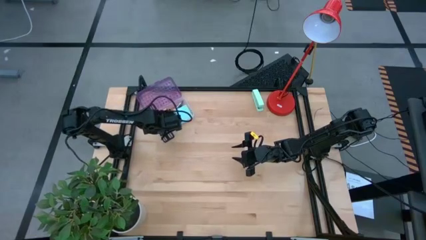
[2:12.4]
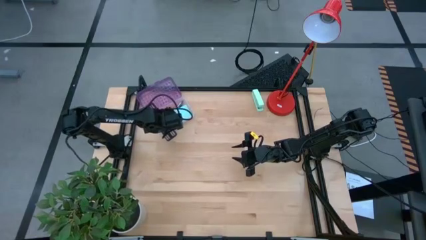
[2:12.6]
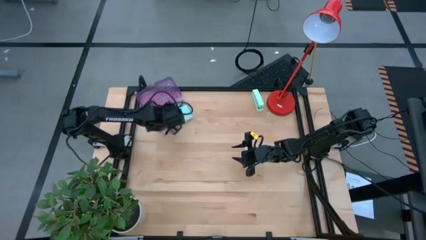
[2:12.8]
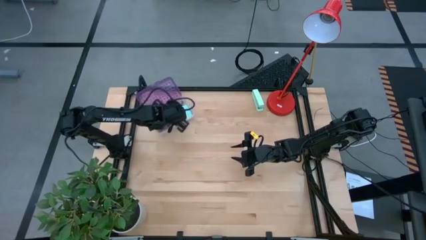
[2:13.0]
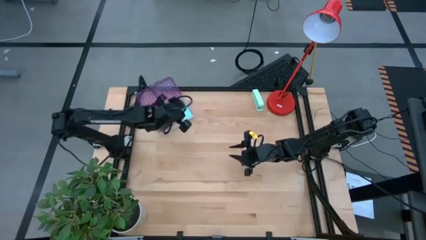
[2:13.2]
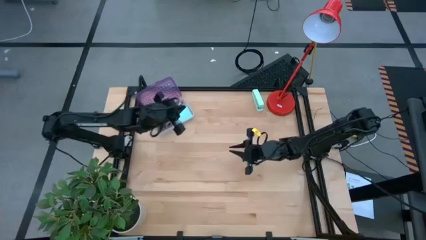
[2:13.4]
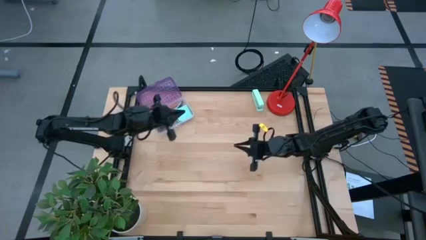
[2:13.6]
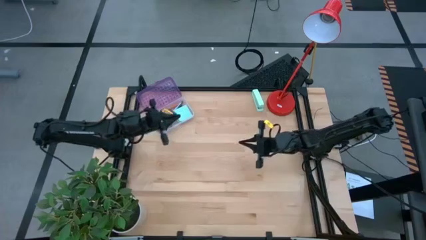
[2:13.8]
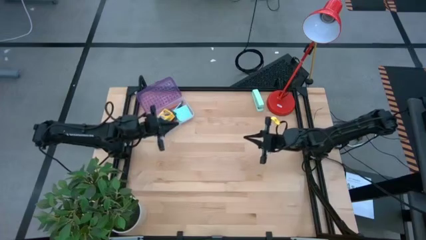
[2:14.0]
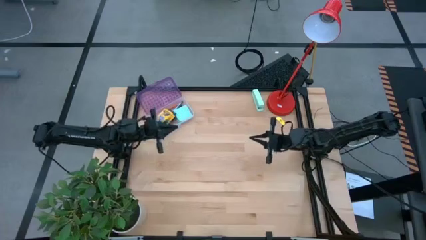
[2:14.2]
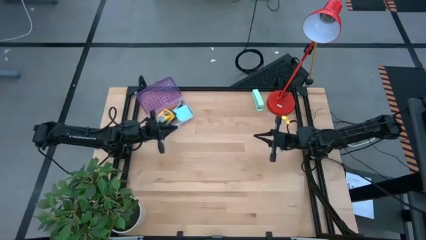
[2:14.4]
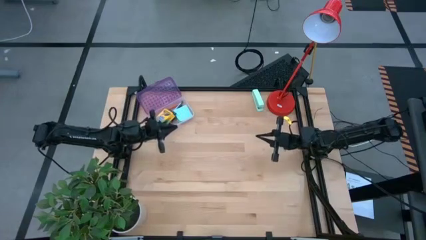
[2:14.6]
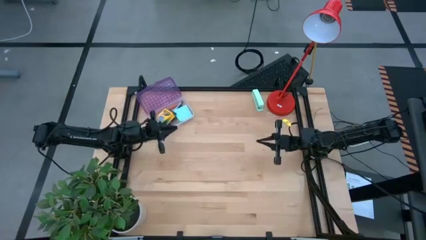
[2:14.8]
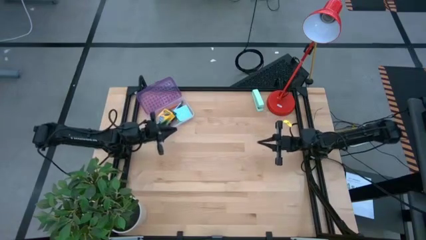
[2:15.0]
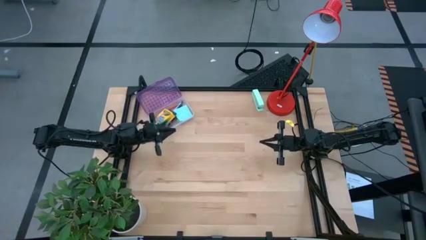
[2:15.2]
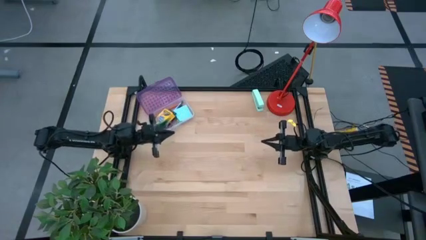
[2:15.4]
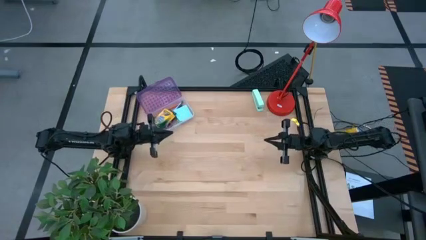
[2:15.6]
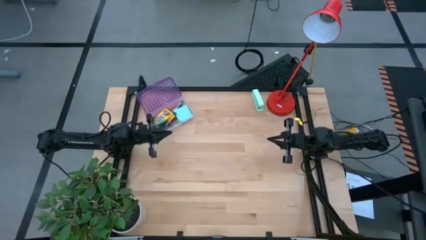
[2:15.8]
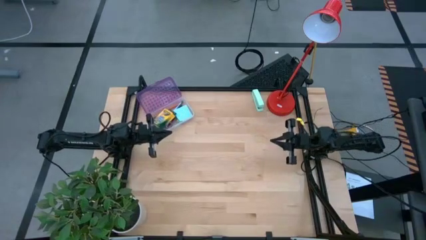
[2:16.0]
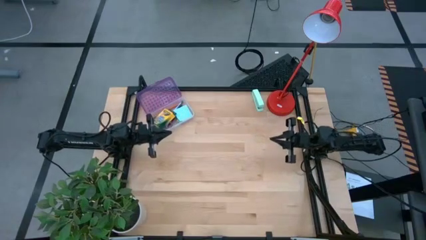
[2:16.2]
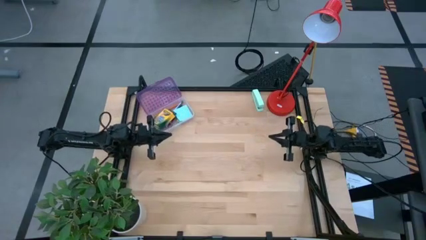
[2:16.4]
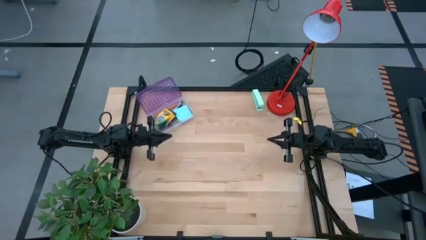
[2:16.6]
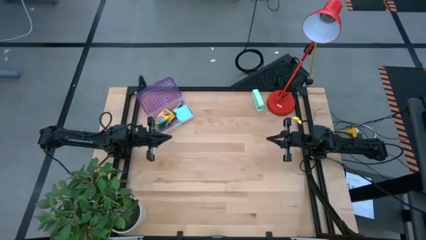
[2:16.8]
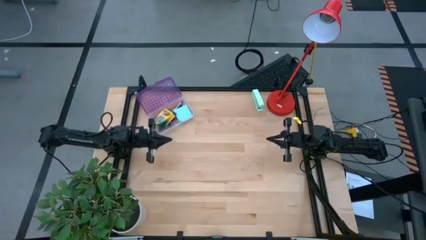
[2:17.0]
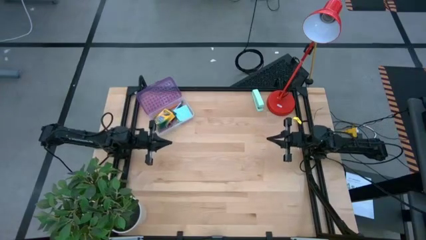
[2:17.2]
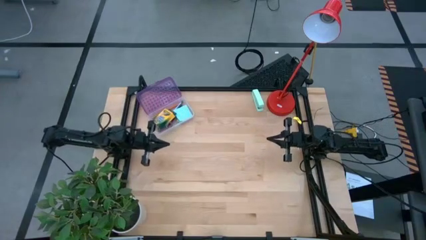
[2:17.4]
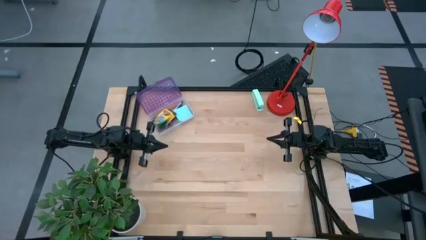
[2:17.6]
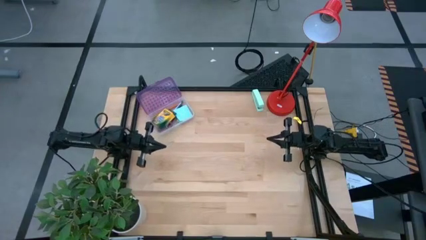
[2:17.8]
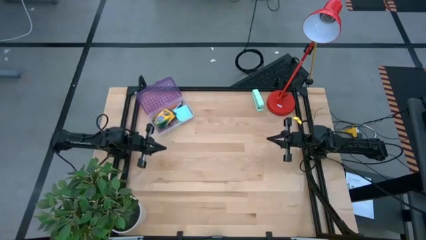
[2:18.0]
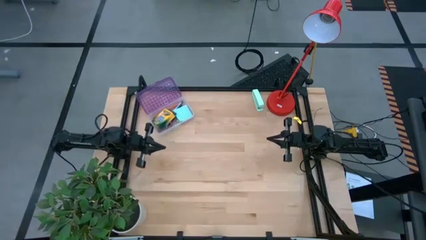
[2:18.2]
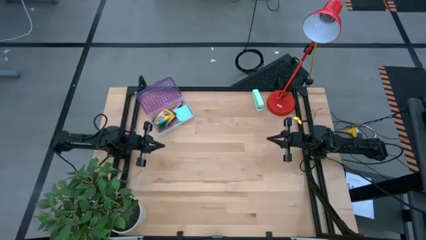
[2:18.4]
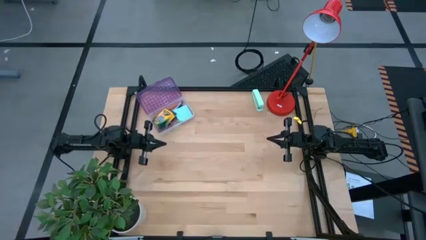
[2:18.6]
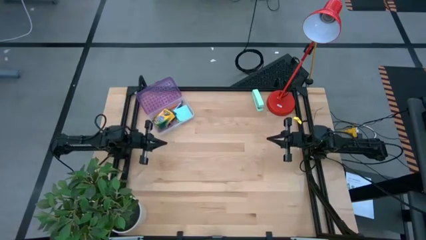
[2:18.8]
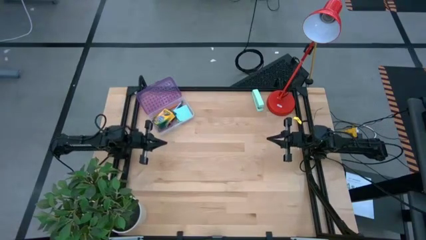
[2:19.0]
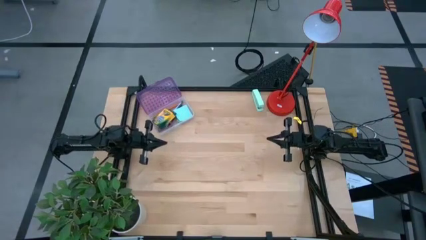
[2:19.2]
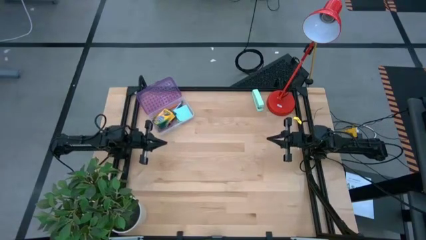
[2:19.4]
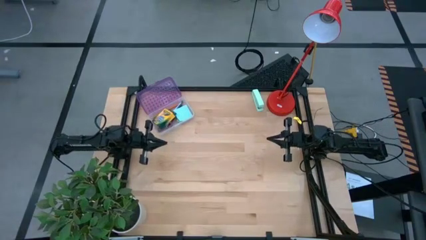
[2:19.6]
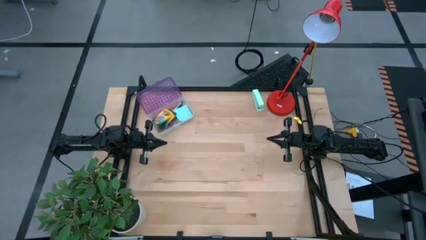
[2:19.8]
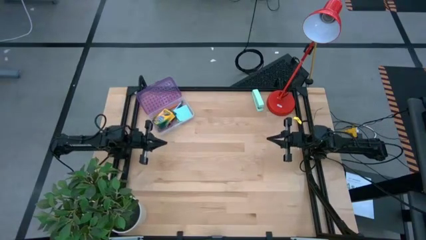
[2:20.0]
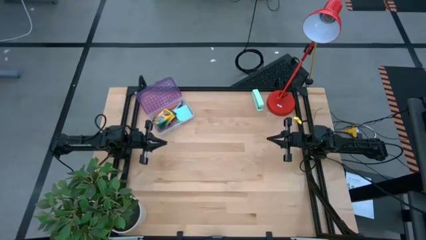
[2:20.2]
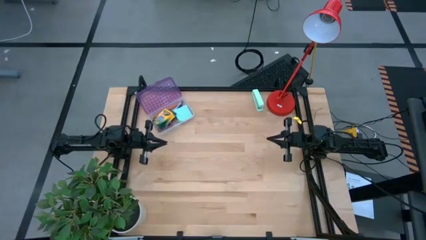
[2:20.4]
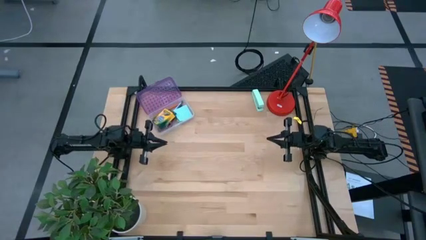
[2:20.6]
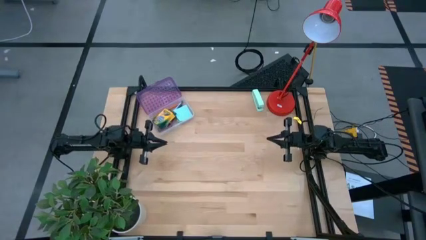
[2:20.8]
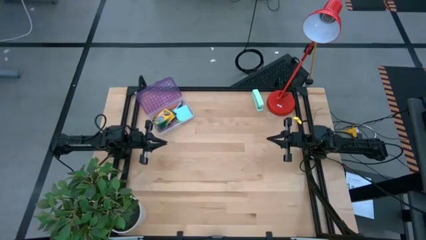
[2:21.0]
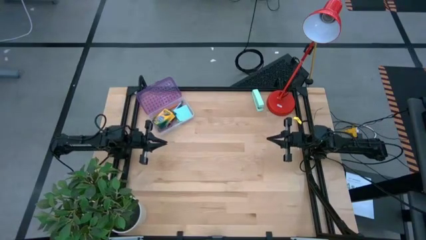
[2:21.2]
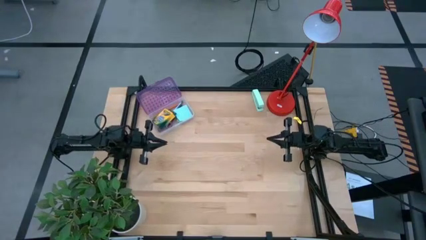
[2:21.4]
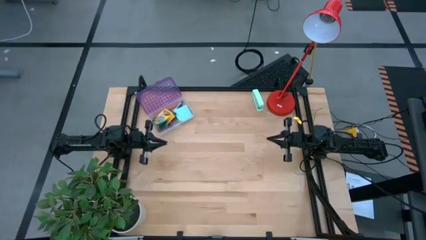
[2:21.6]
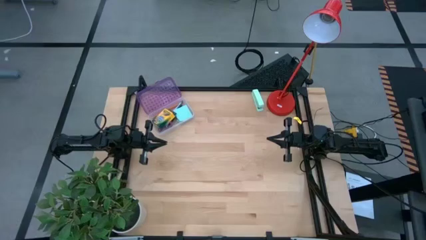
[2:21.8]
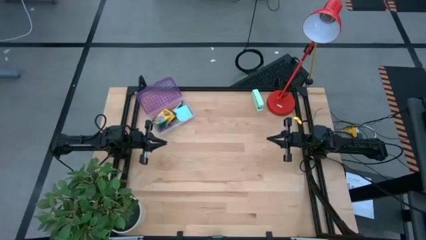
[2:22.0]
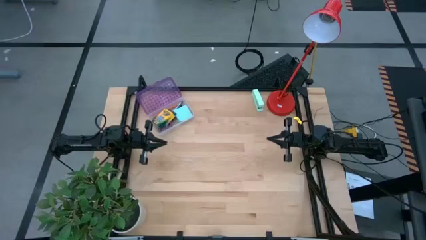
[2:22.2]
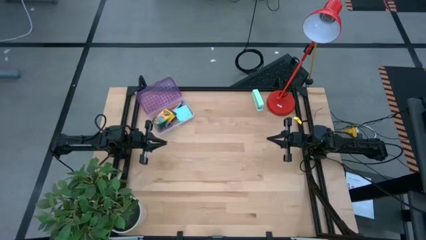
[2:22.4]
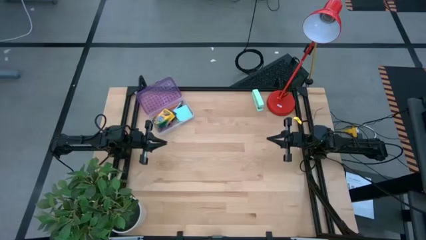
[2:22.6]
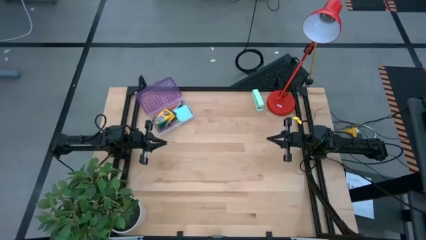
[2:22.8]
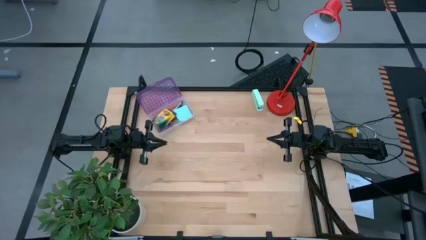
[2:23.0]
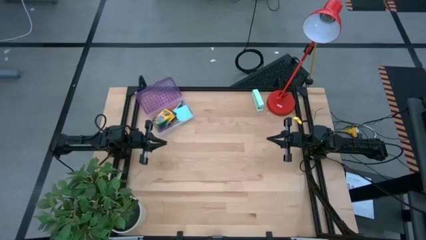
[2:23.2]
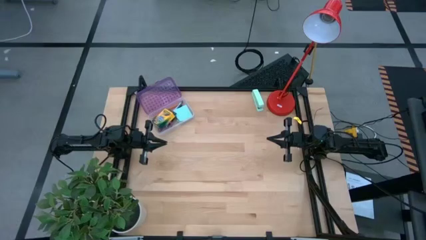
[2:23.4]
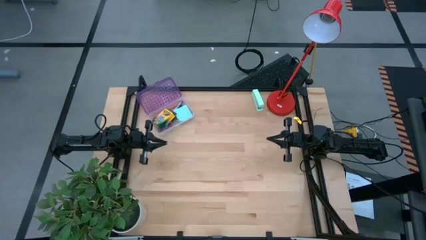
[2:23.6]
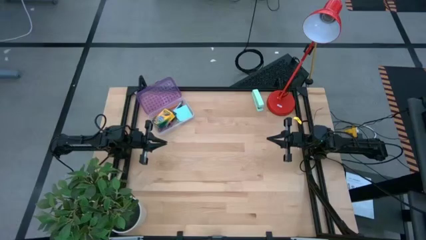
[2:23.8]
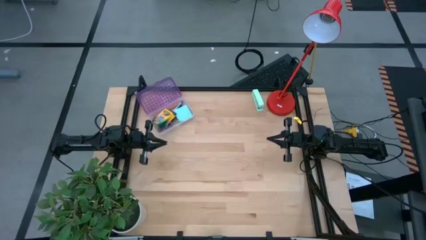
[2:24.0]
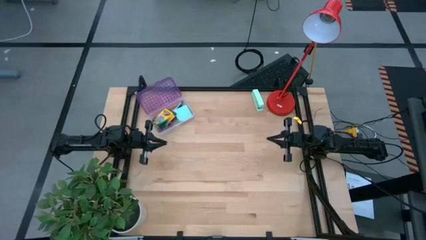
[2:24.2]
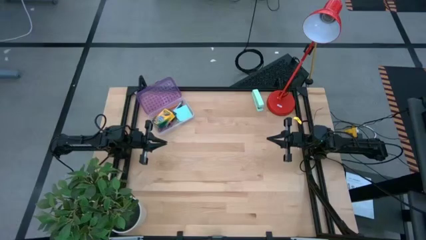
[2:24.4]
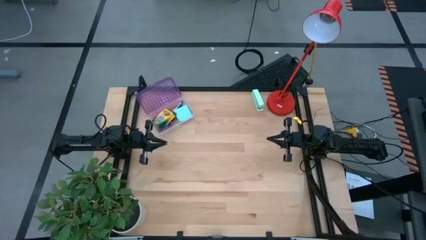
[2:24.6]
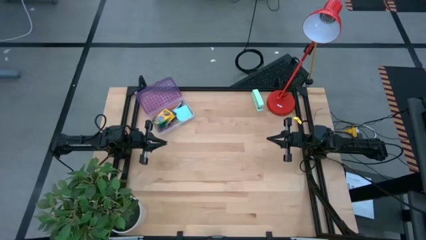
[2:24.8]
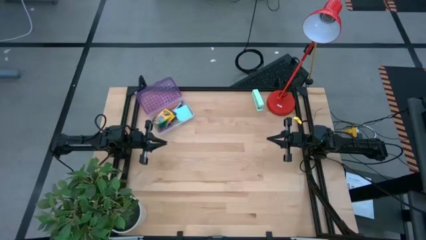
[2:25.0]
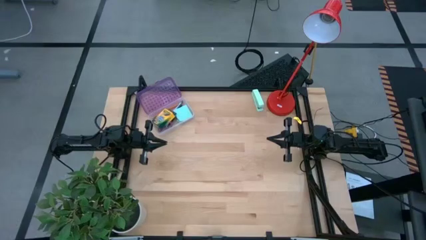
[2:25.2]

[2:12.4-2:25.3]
Task: Pack school essentials
Return to Home Position
